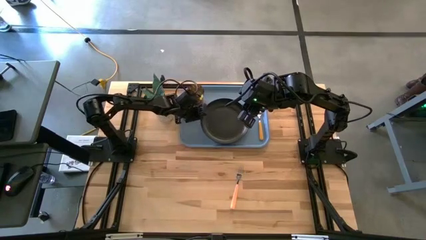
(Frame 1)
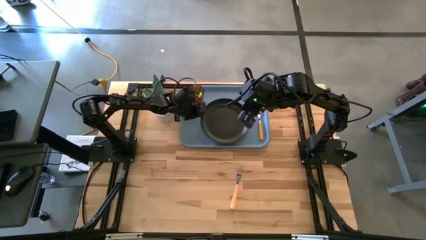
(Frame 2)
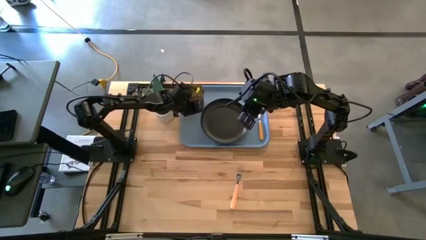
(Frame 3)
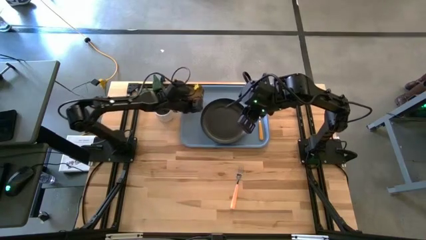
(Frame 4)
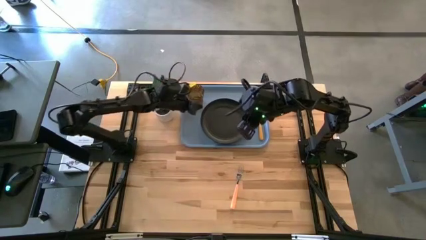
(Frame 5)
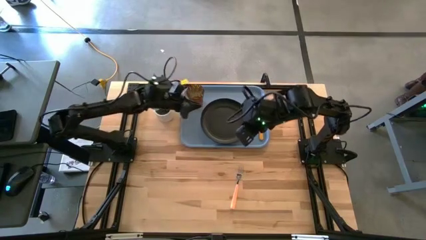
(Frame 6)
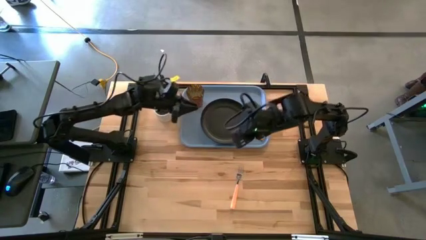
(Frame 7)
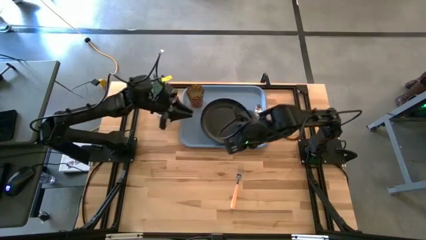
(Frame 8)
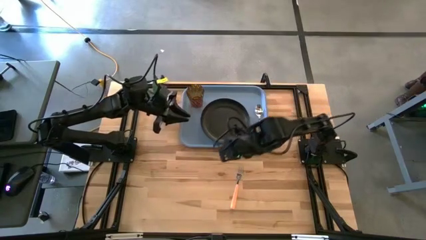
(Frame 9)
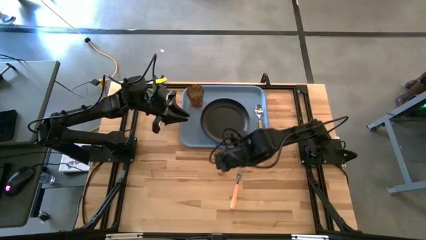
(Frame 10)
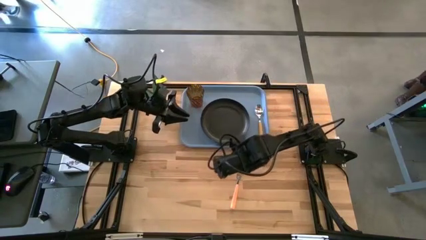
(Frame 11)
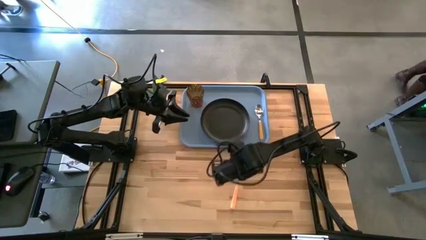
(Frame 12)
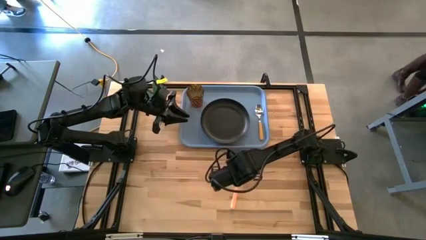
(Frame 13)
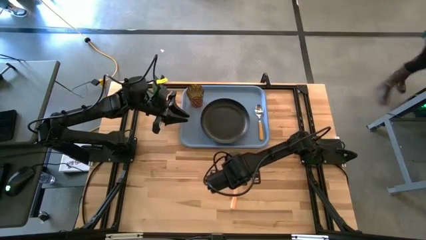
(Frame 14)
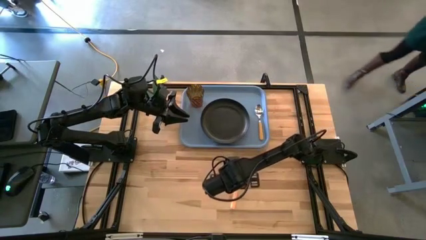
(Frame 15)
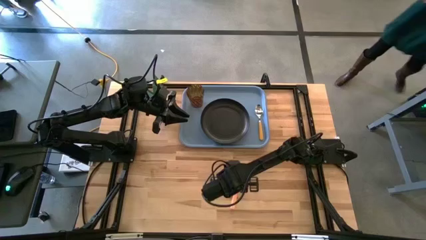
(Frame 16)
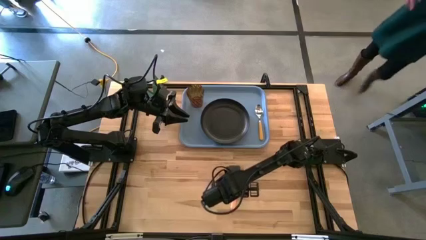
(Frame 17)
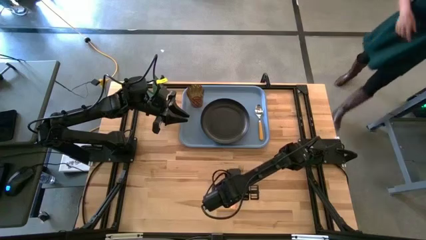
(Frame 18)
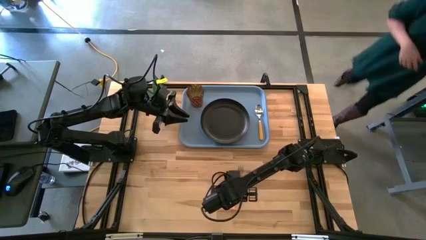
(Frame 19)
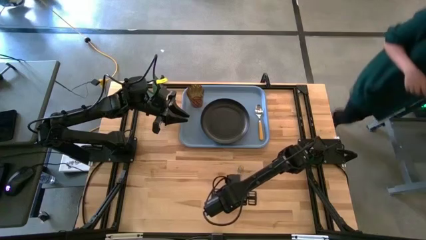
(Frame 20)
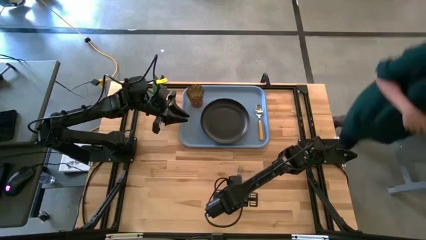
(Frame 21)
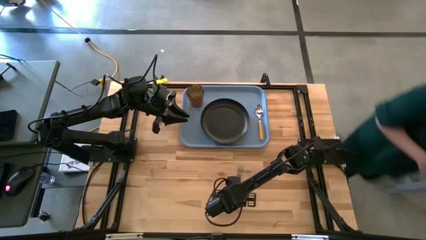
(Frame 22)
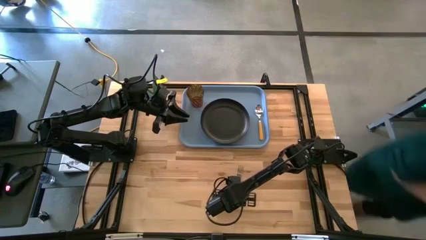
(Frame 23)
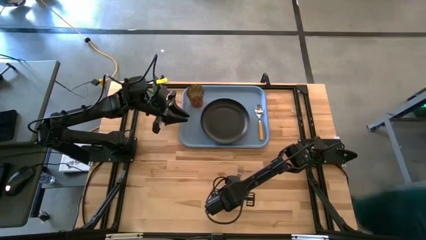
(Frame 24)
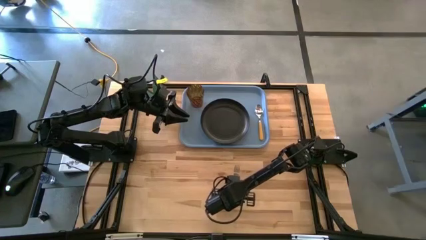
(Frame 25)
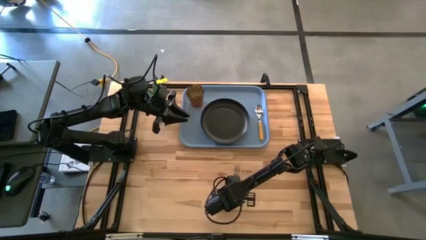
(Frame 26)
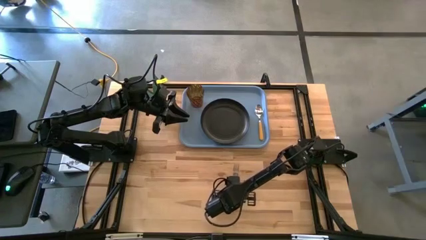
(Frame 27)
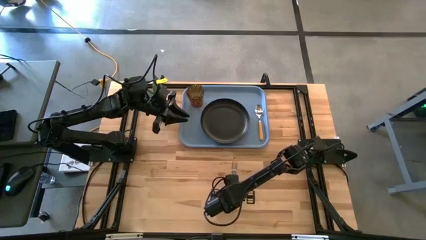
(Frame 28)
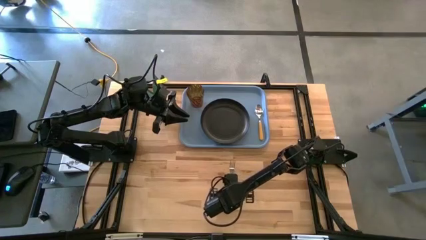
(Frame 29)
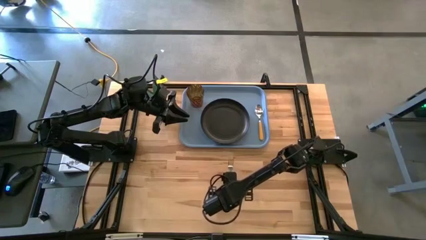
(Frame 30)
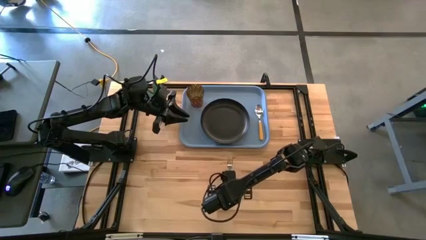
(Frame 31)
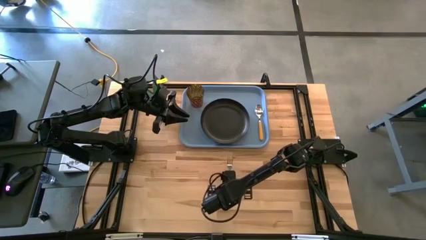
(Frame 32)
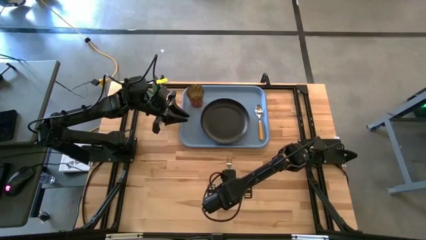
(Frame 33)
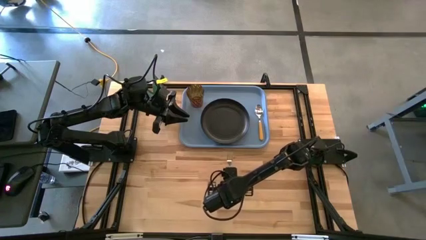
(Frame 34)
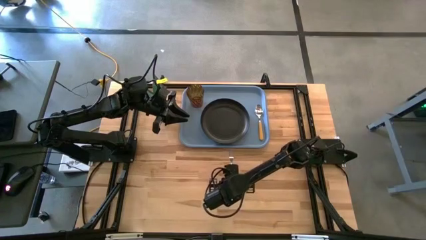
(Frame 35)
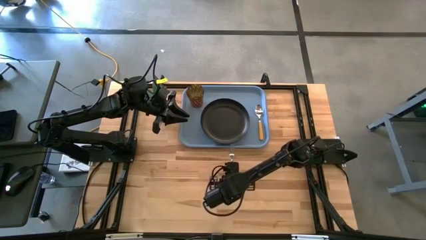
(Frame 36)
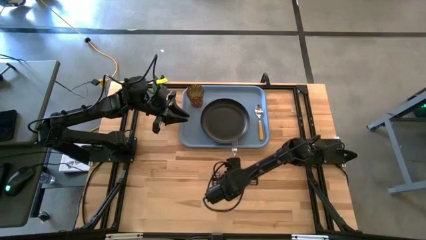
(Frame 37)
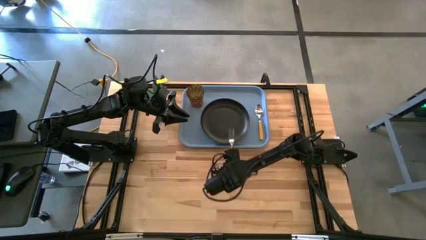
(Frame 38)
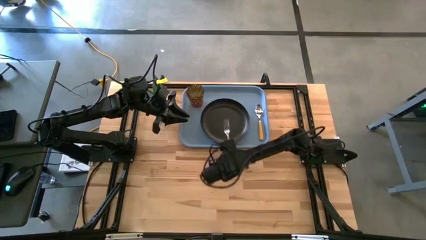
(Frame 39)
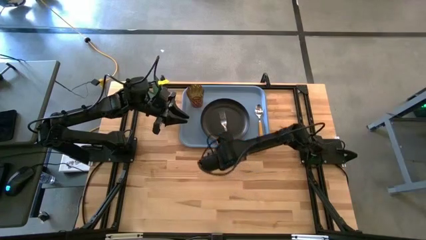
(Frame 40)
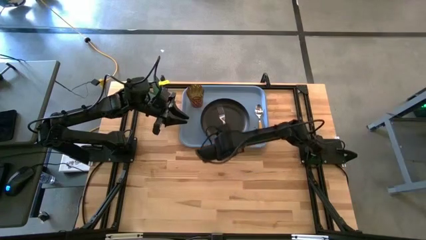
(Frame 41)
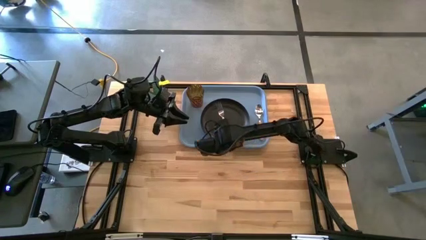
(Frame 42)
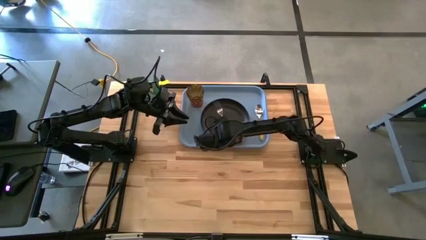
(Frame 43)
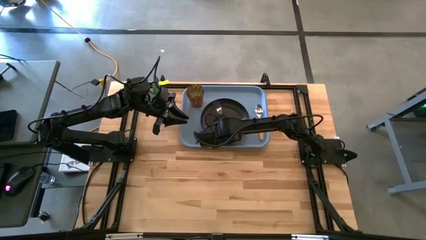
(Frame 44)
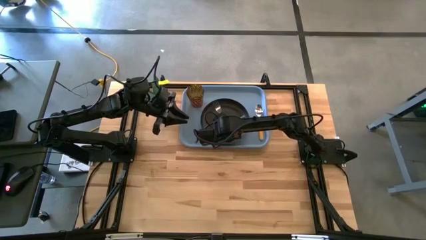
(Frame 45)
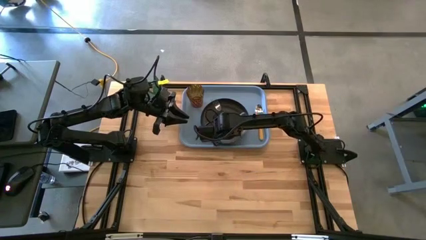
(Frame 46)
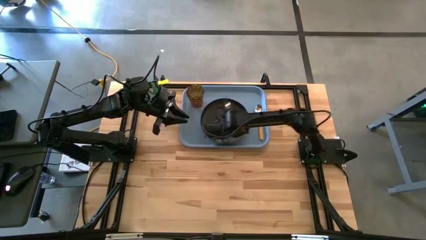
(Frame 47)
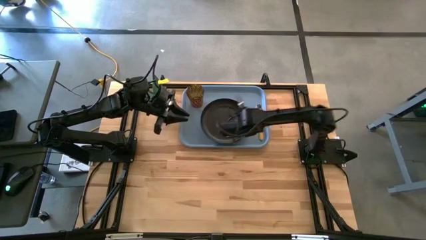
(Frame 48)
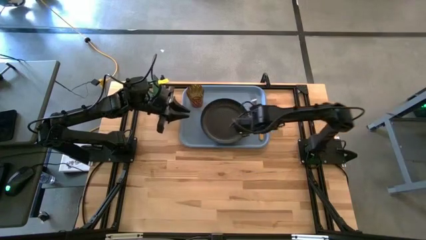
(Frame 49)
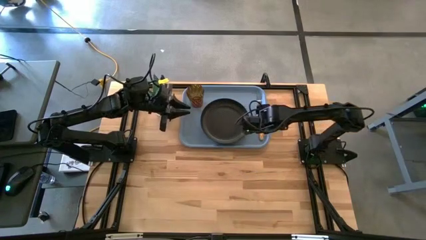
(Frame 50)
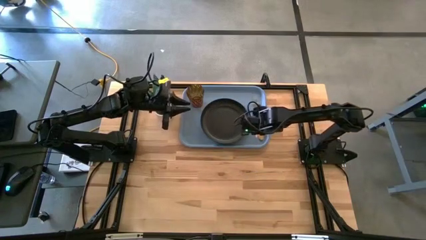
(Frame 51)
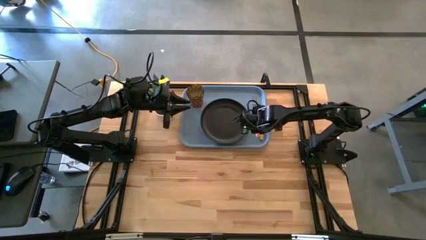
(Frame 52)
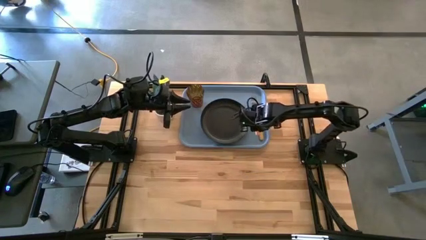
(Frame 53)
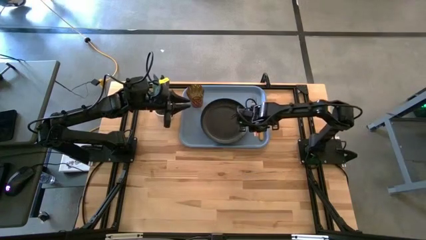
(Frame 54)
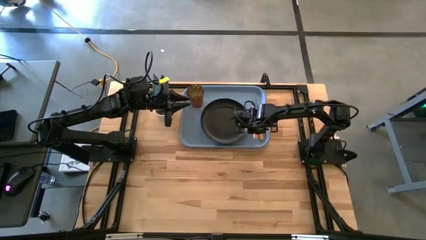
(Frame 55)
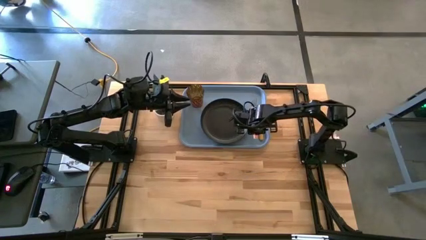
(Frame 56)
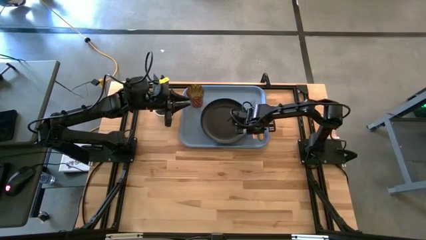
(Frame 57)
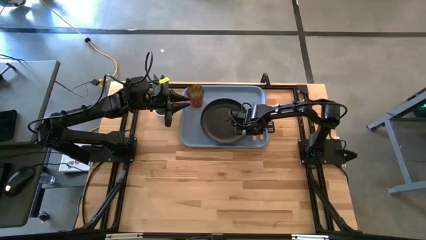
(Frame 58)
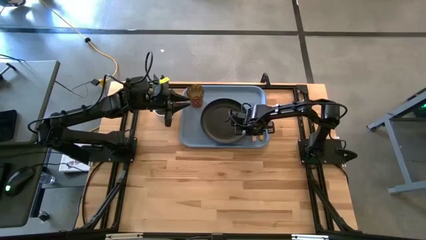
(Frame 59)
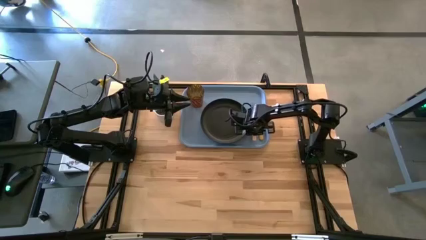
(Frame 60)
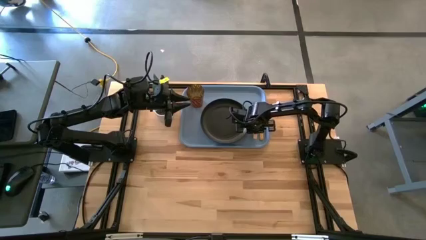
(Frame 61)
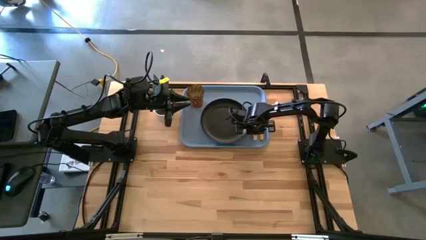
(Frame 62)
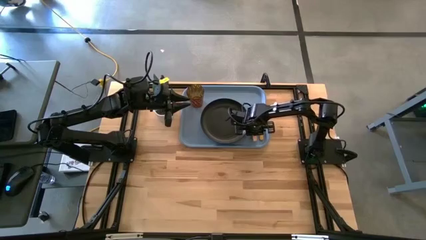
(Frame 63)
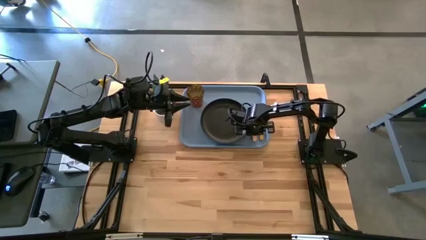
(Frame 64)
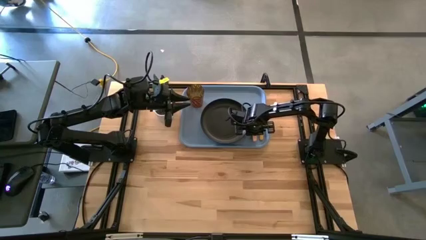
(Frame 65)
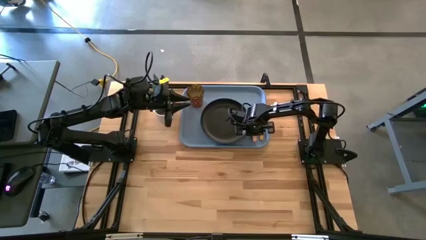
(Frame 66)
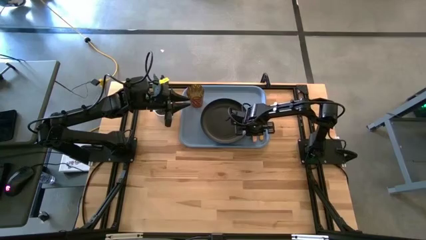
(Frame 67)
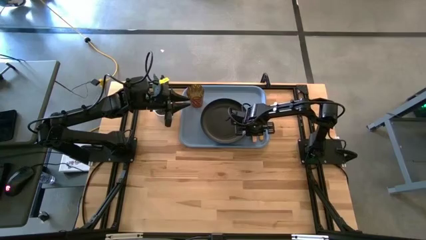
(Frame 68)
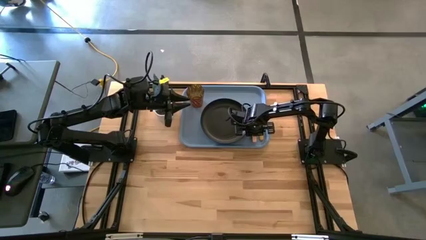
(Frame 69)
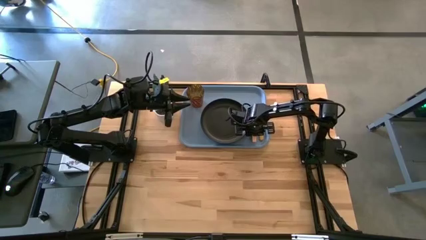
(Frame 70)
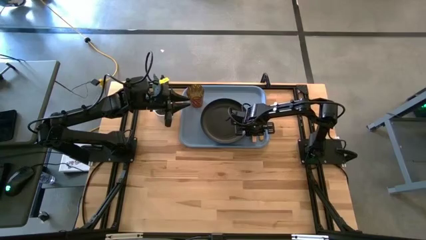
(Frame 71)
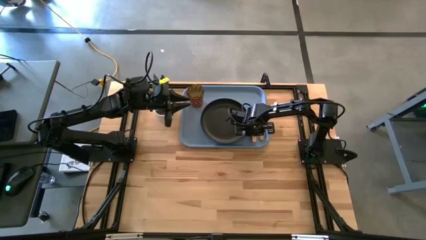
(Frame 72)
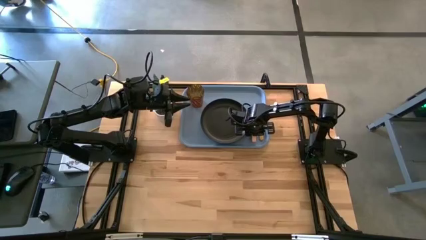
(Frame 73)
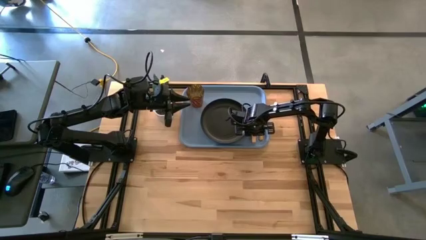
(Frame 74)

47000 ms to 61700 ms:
Task: Pick and place plate/cup/fork/spoon on tray
Put the orange fork to the right of the black plate on the blue tray
